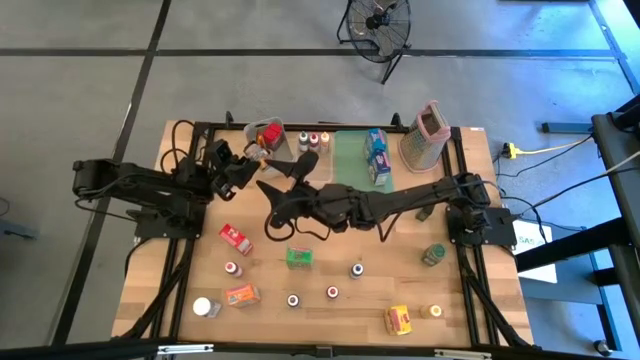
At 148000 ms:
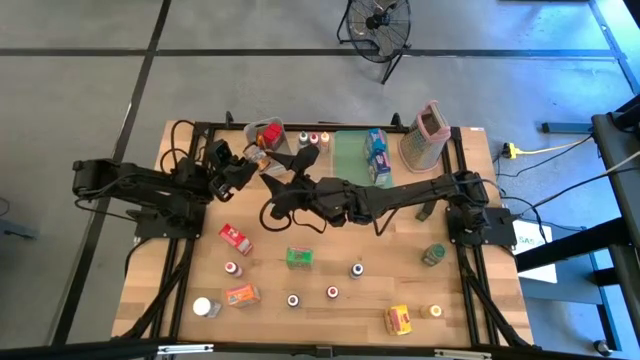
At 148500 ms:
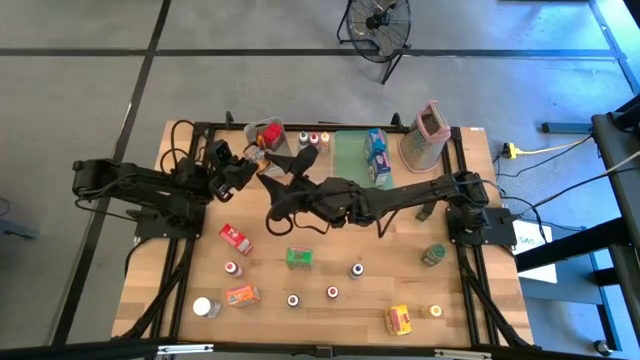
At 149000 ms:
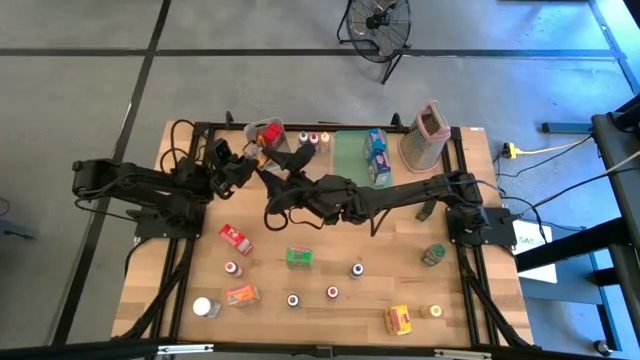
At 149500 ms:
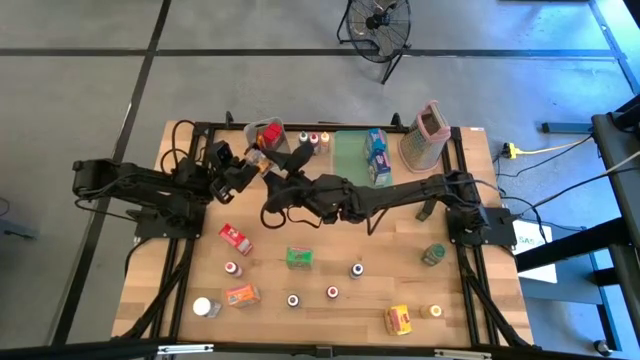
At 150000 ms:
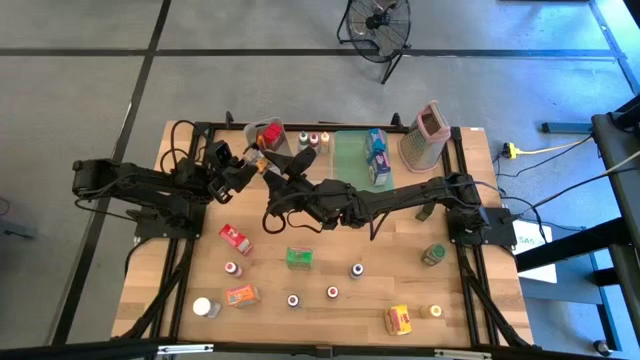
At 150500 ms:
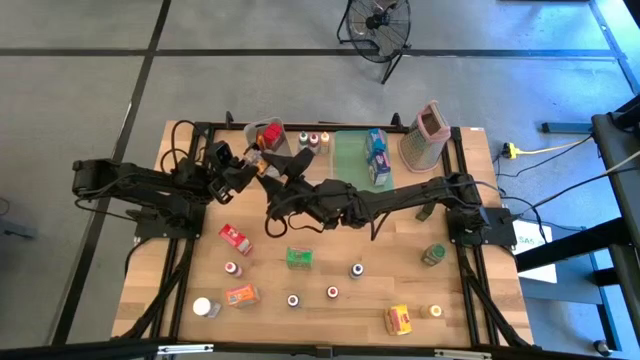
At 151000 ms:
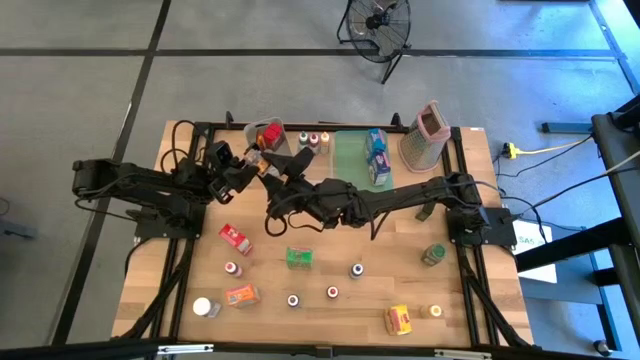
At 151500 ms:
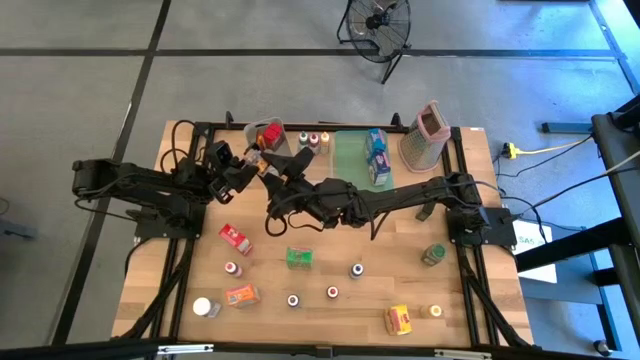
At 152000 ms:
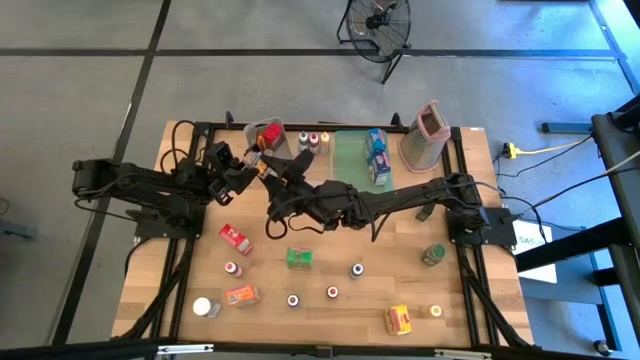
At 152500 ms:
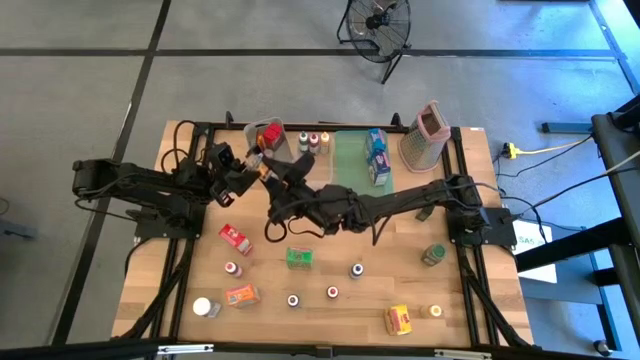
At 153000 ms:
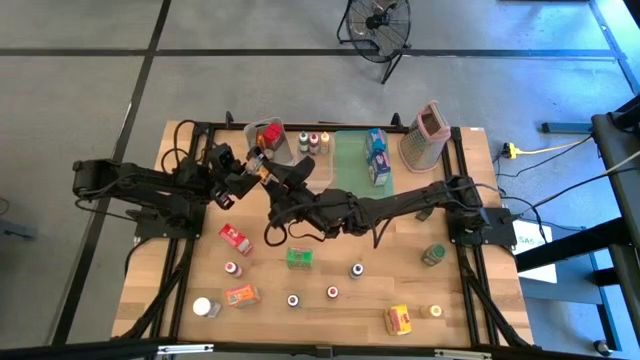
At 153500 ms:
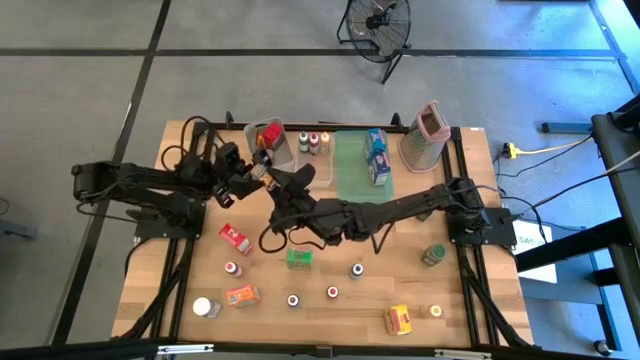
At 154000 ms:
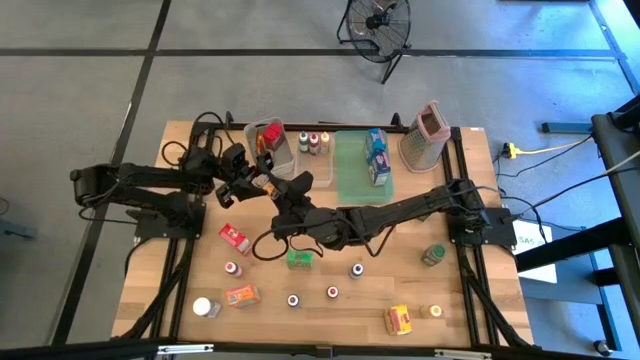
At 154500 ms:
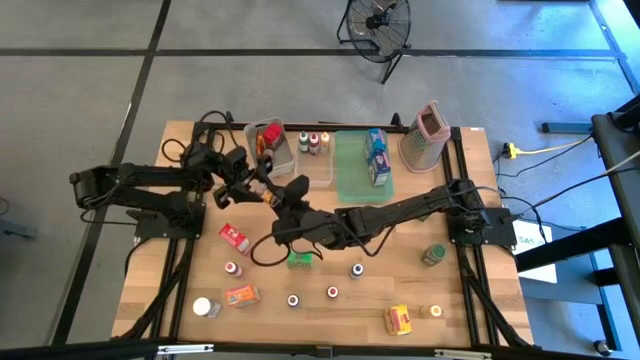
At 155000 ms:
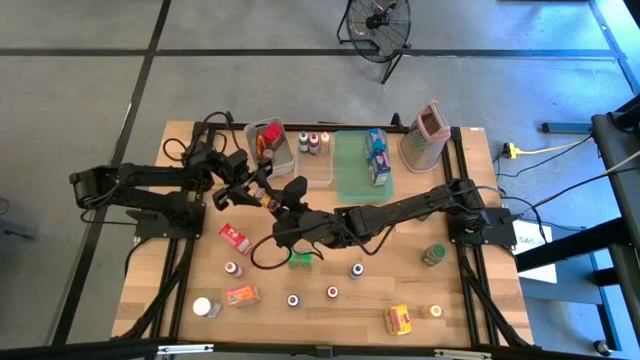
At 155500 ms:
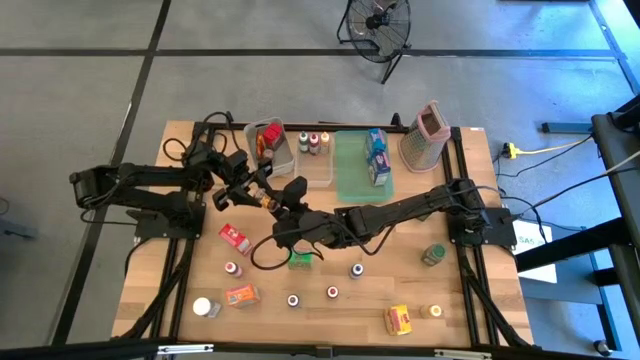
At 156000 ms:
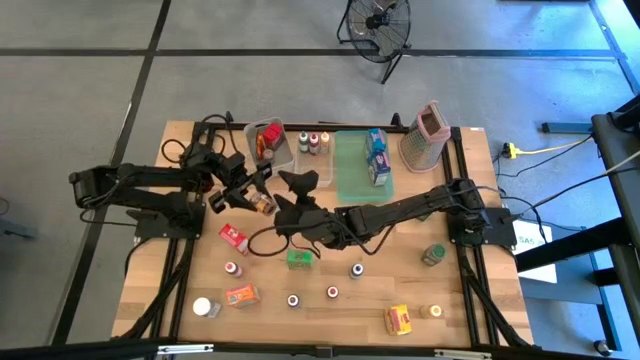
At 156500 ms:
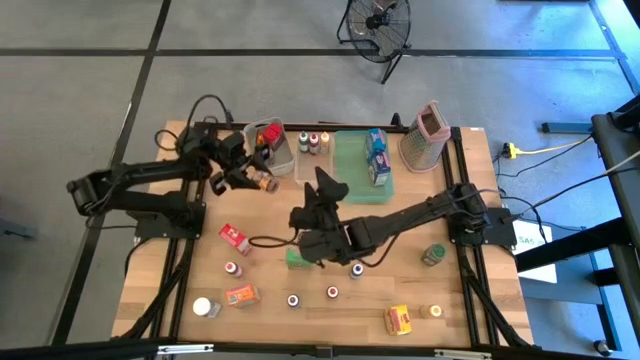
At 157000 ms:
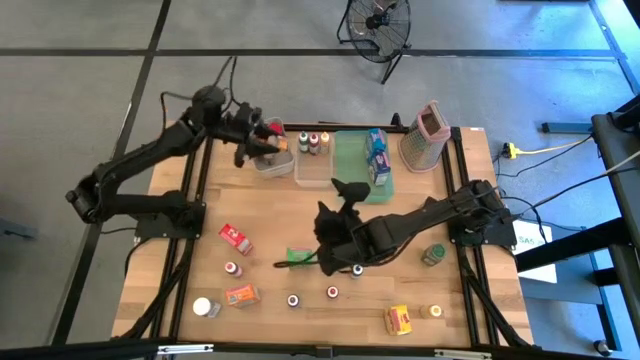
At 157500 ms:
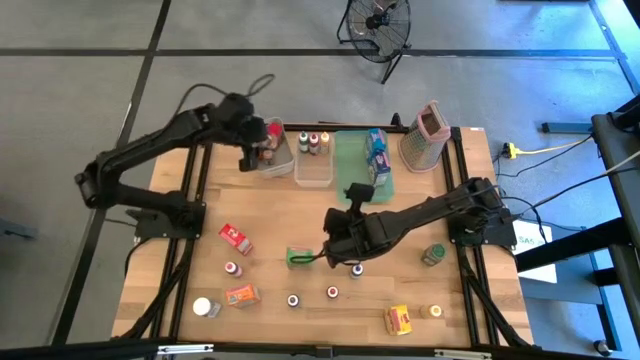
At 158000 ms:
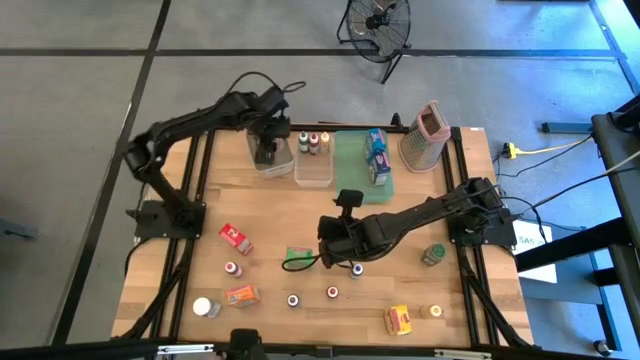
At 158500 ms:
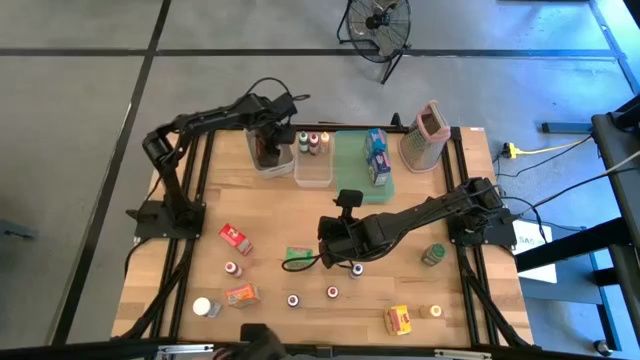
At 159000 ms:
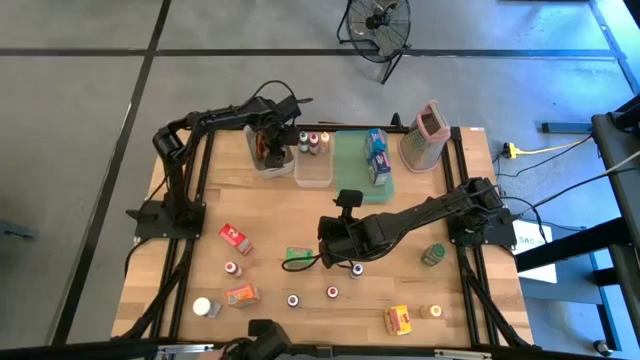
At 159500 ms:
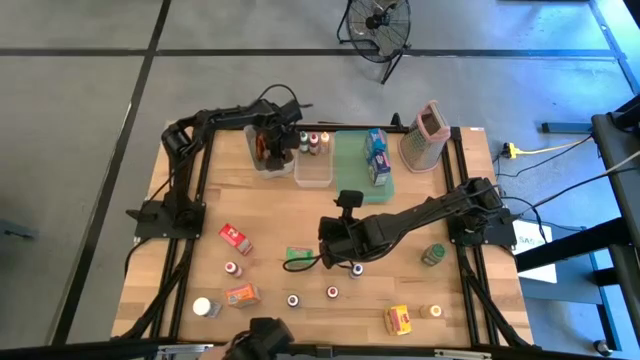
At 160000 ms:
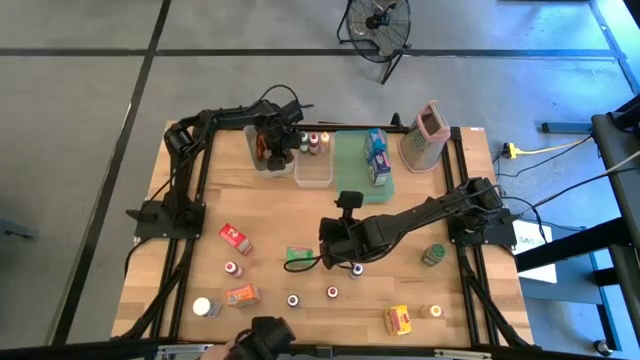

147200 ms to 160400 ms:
Task: Pick & Place Kitchen Items
Put the brown seasoning bottle into the gray bin

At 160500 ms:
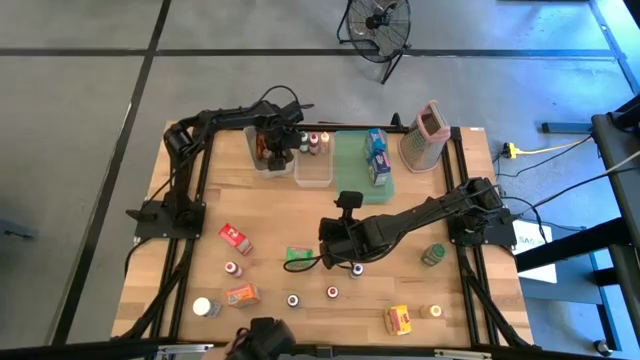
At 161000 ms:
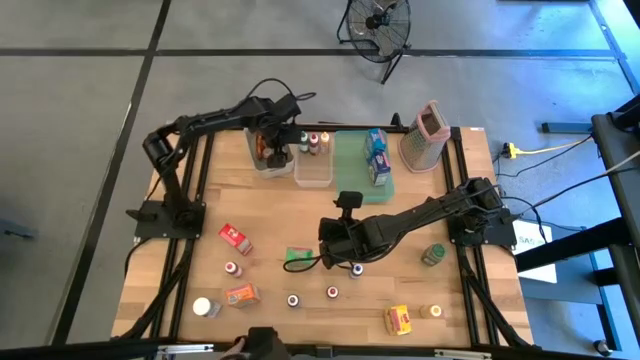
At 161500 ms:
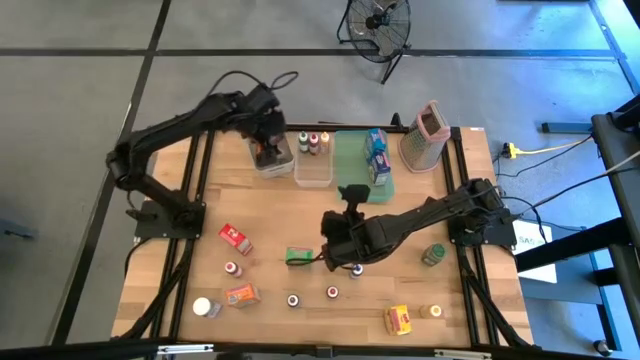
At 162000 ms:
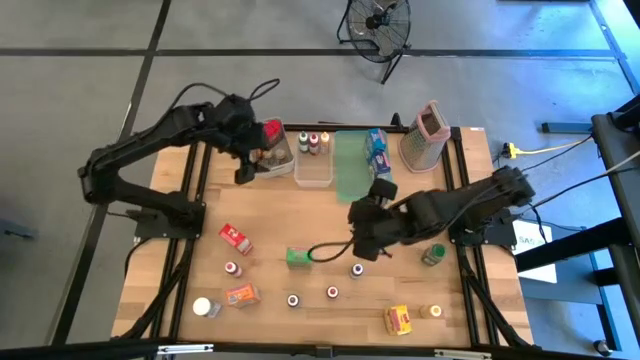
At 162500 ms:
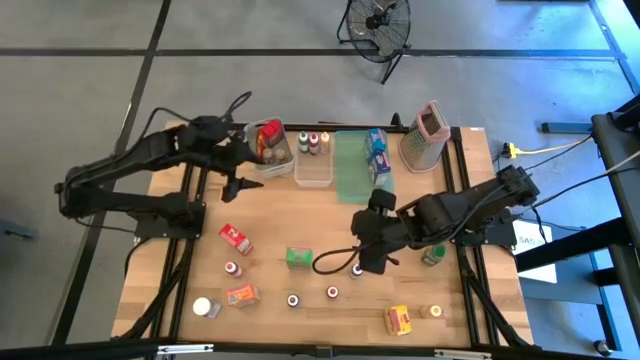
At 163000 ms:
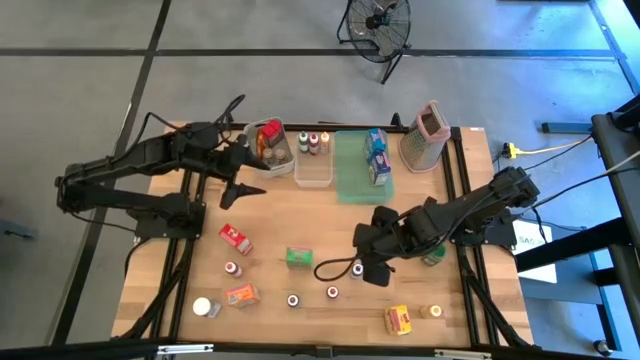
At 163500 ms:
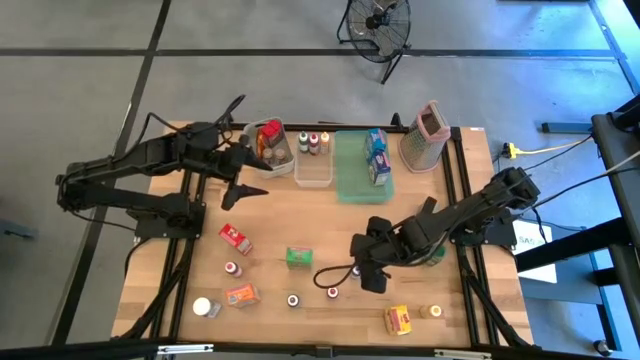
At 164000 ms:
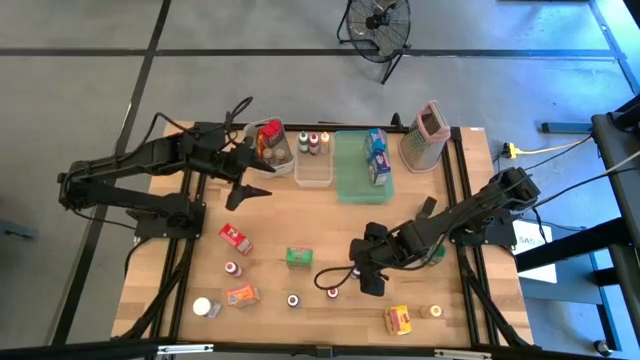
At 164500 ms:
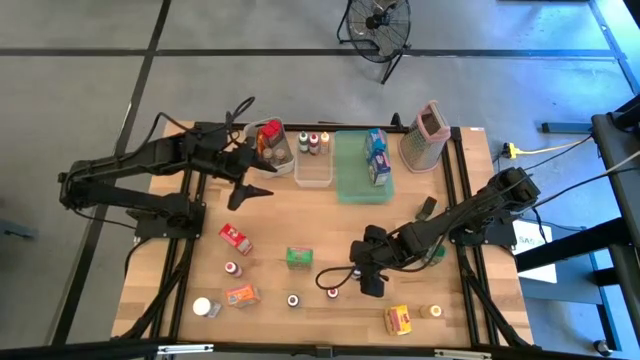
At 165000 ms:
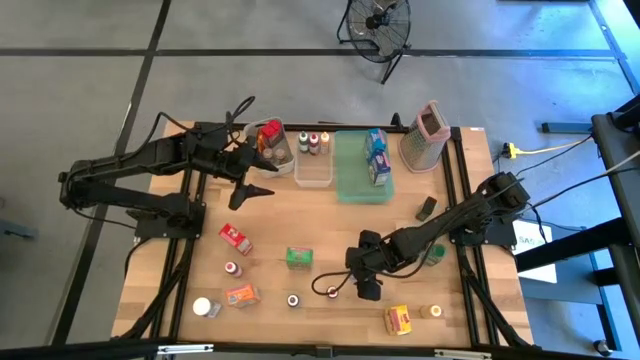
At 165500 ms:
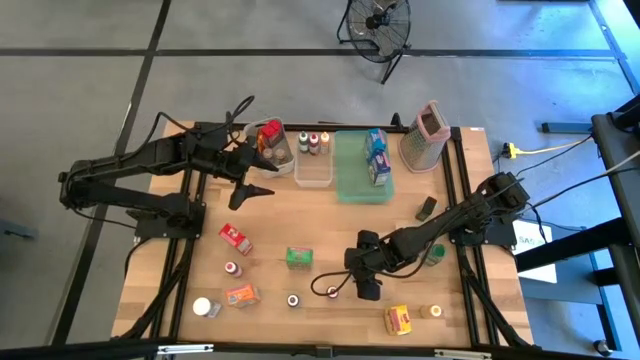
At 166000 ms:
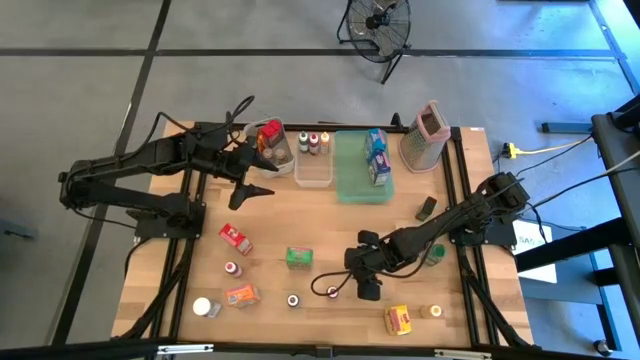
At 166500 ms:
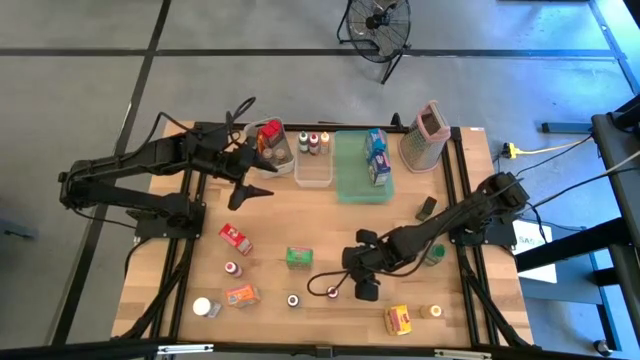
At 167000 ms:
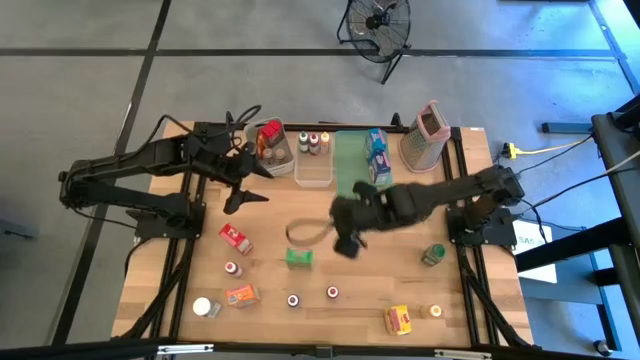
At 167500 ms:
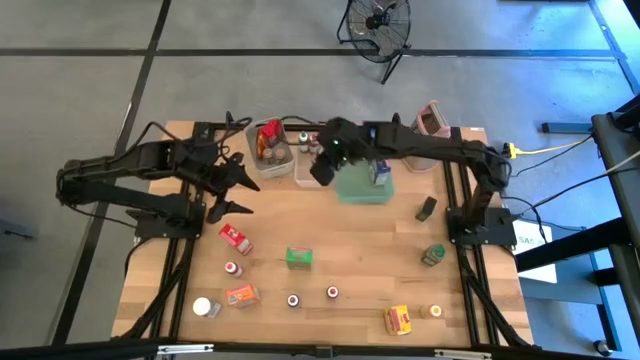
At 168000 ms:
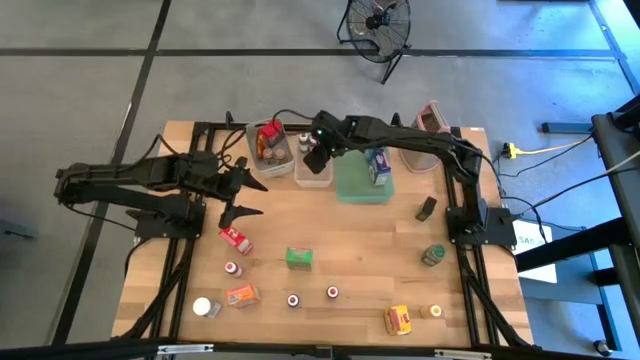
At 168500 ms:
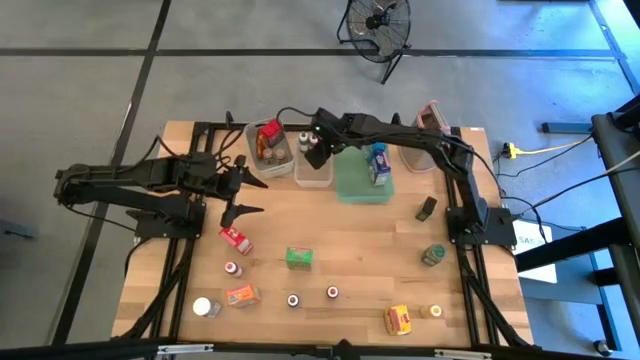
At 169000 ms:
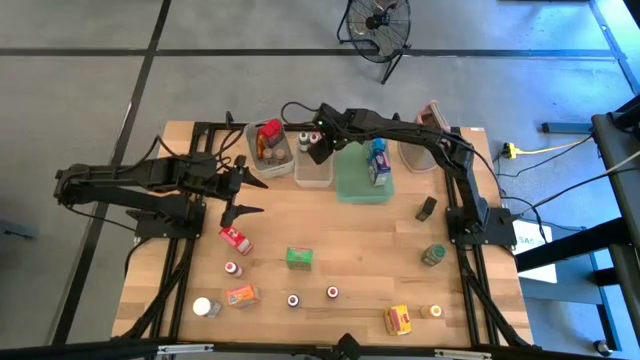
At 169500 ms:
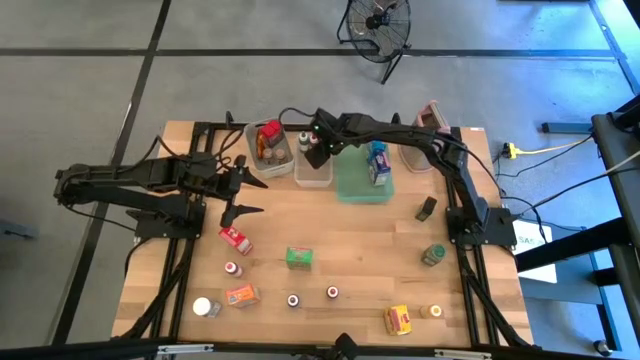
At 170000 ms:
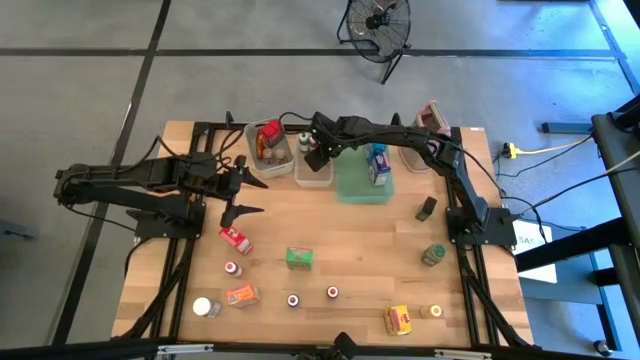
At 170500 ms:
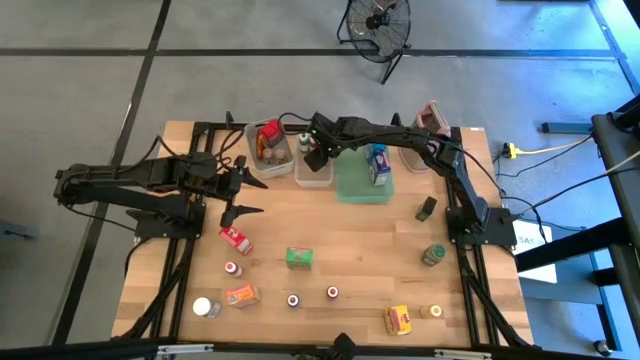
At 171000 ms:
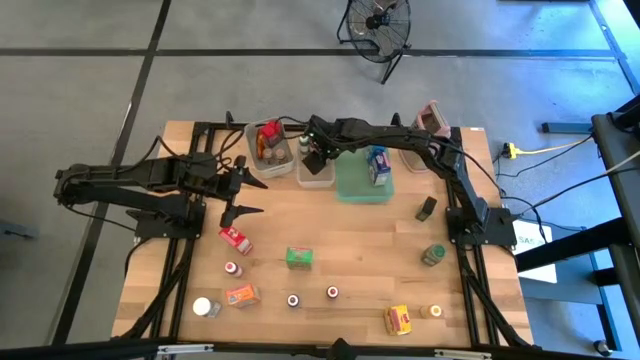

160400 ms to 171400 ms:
Put the blue food coloring bottle into the transparent bin
